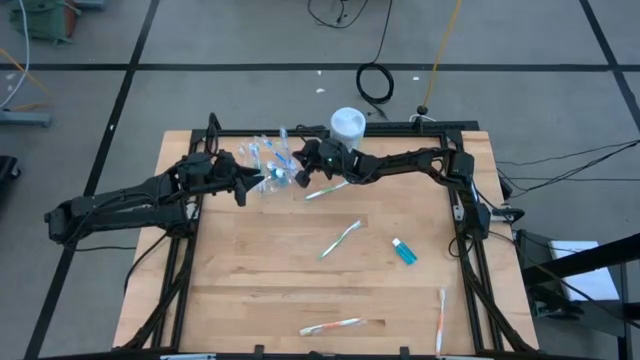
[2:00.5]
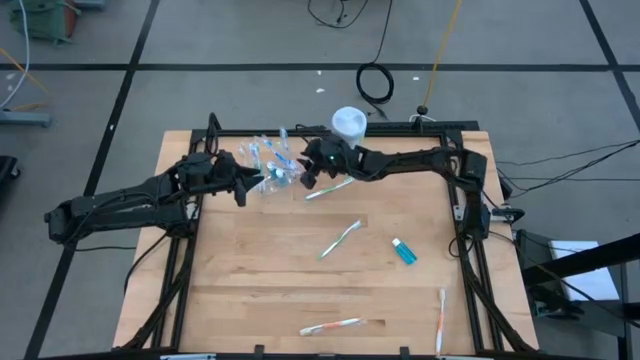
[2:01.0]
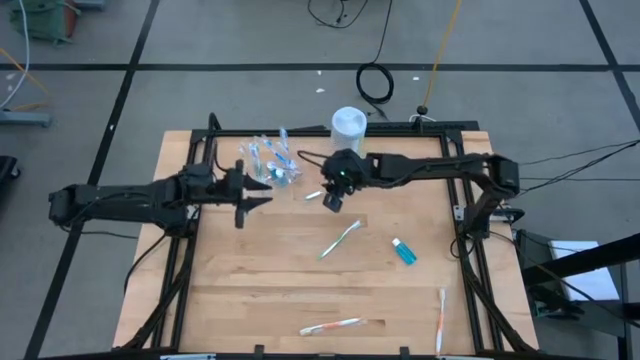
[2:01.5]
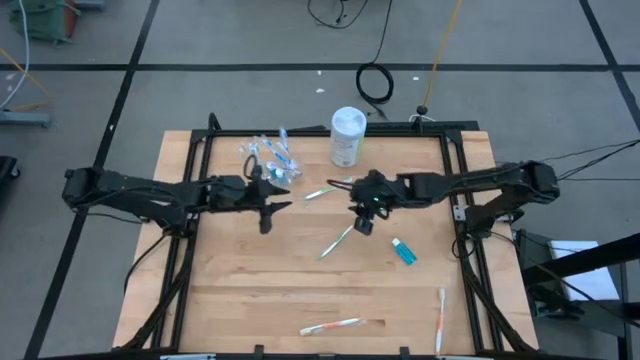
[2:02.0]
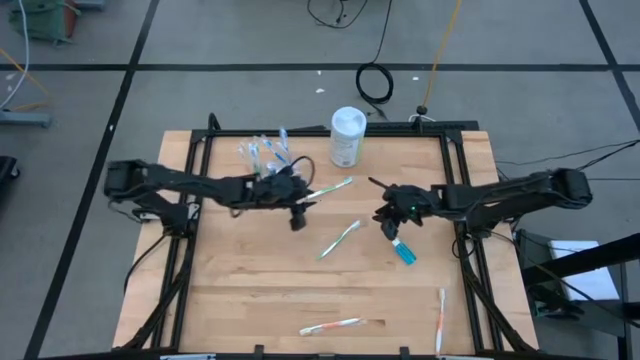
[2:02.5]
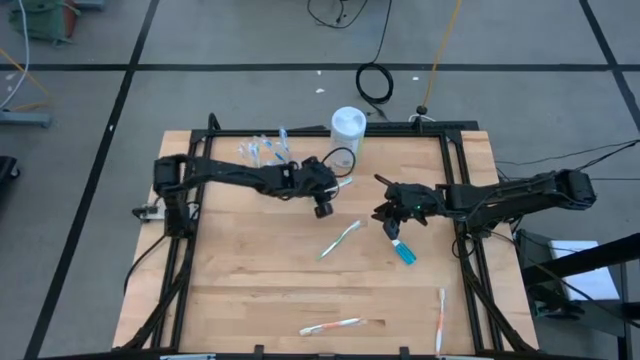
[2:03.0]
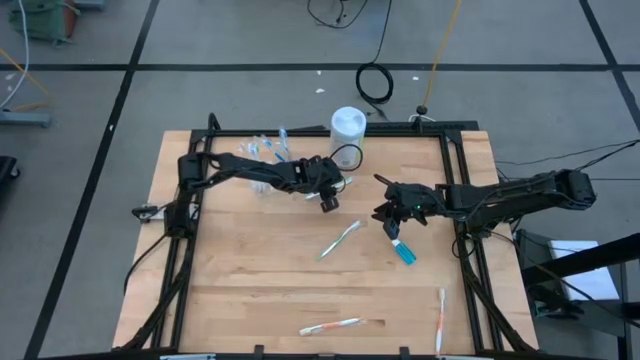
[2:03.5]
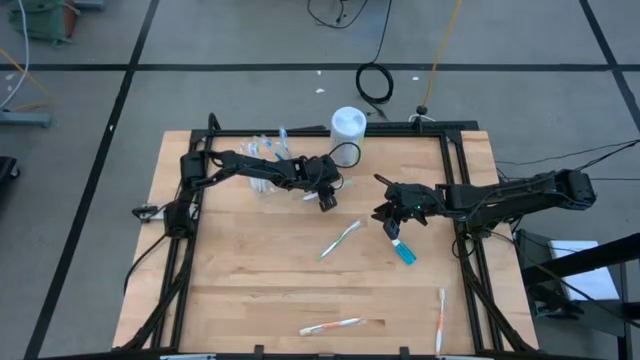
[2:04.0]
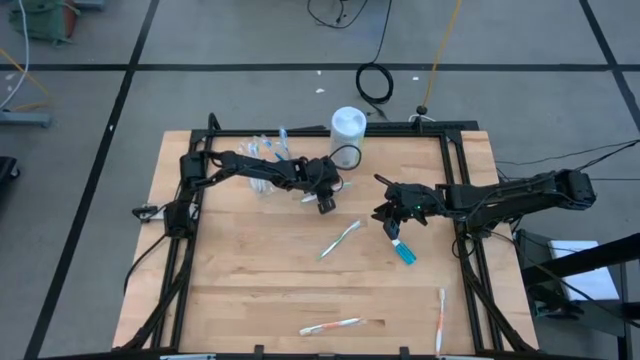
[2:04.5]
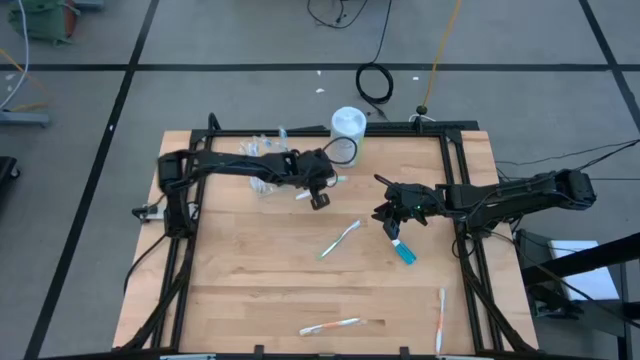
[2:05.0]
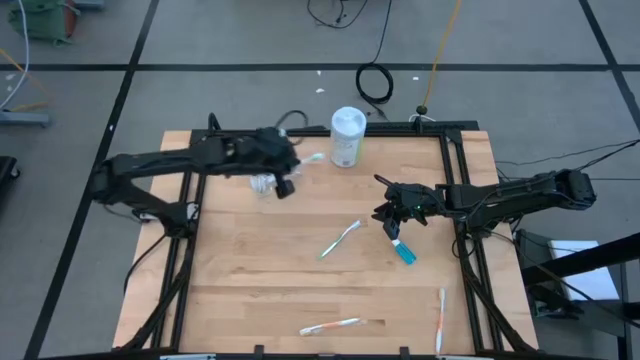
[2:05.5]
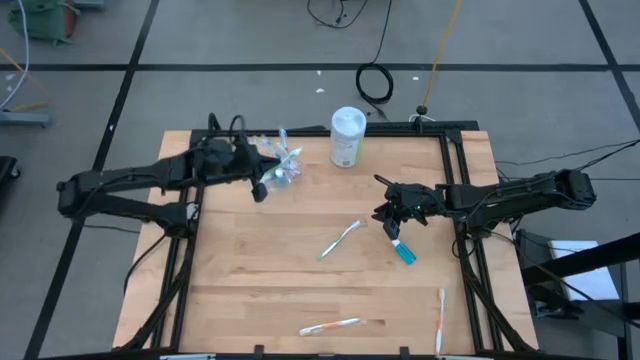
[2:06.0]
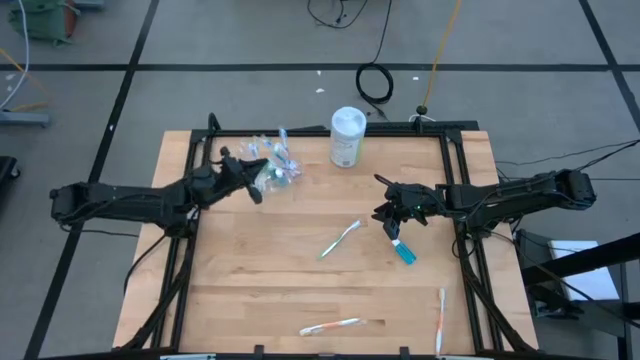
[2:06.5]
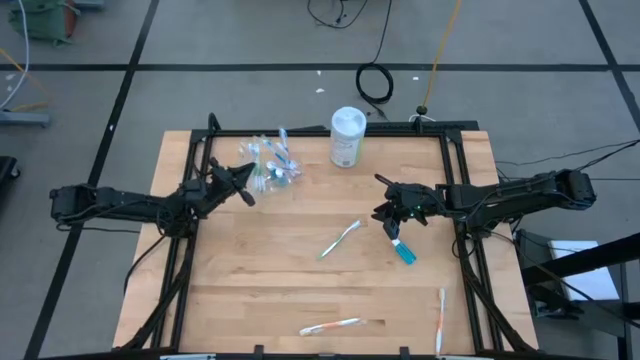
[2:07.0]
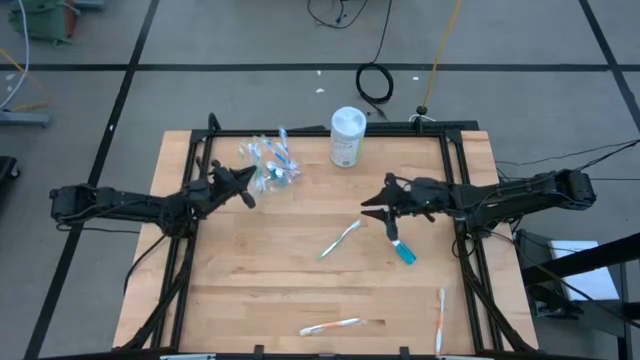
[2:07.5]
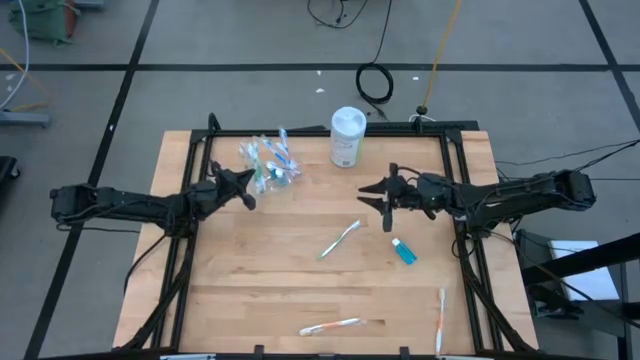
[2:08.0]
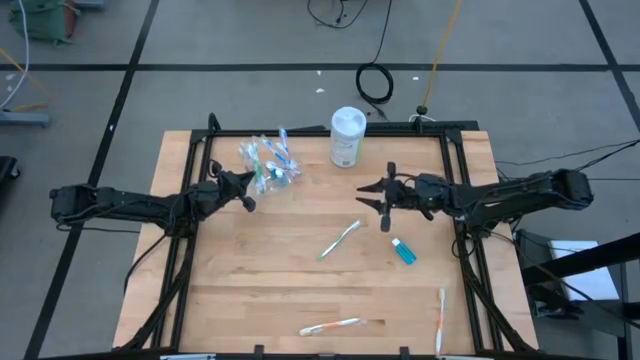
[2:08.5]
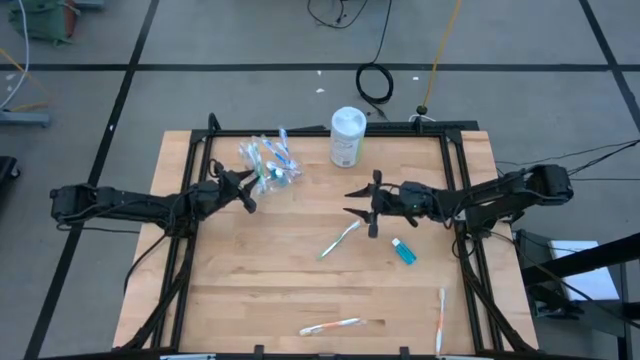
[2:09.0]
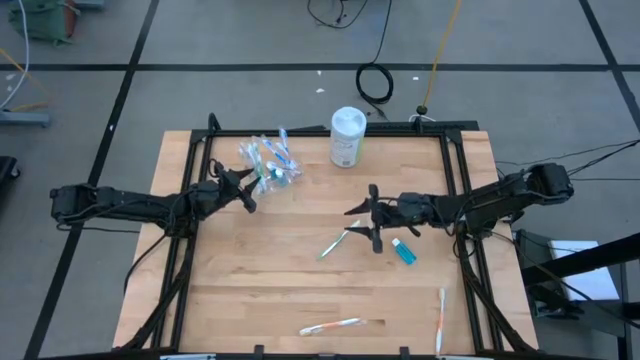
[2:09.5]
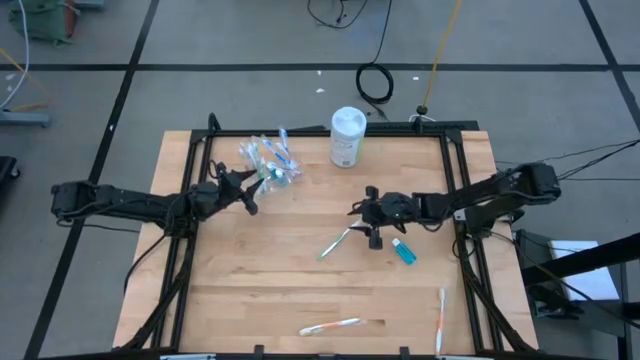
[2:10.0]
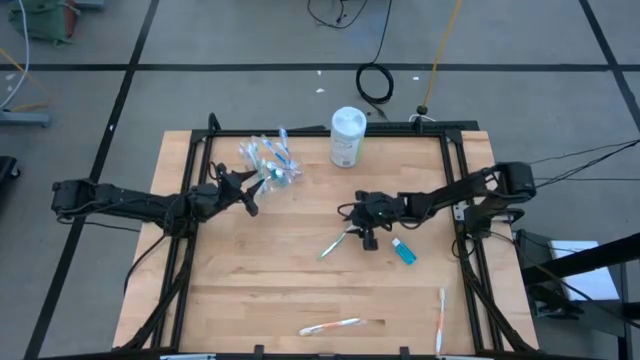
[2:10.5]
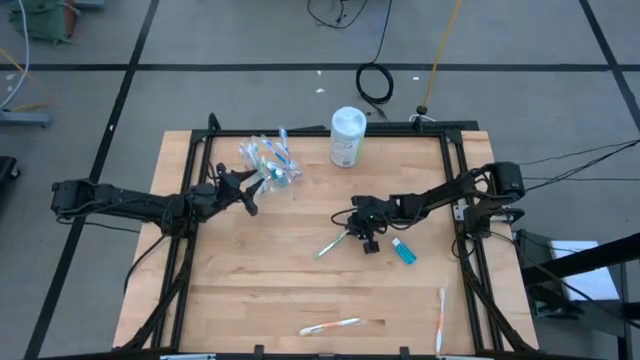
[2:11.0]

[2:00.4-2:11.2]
Task: Pick & Place toothbrushing station
Put the green toothbrush into the left of the transparent organizer

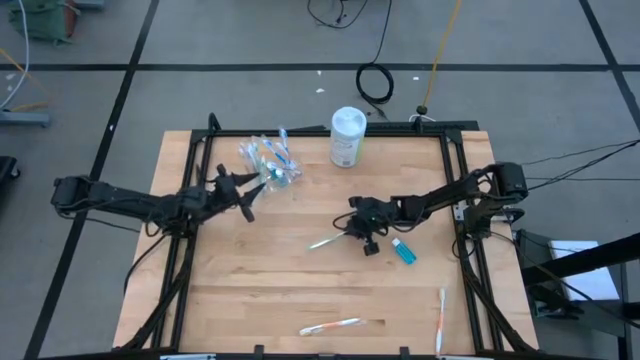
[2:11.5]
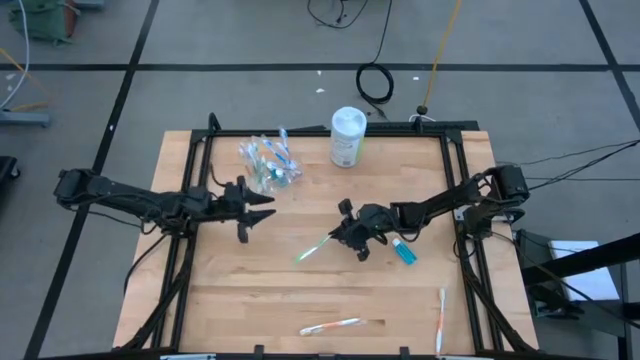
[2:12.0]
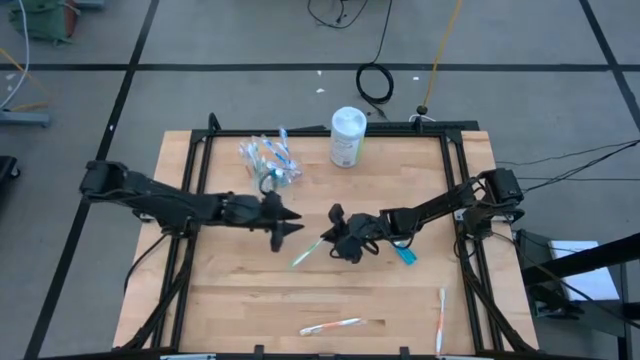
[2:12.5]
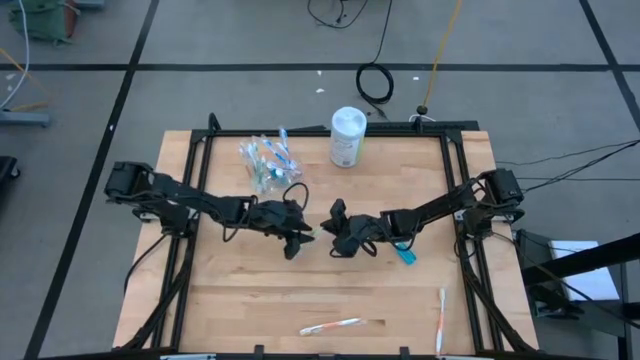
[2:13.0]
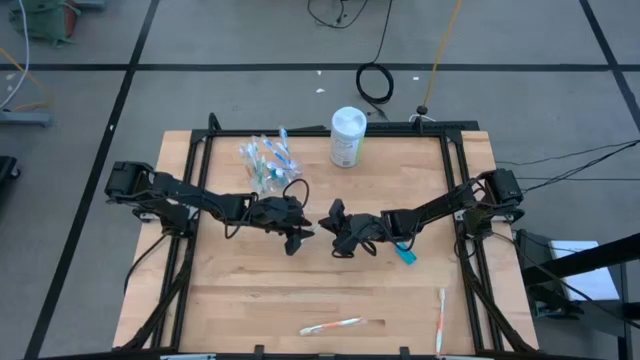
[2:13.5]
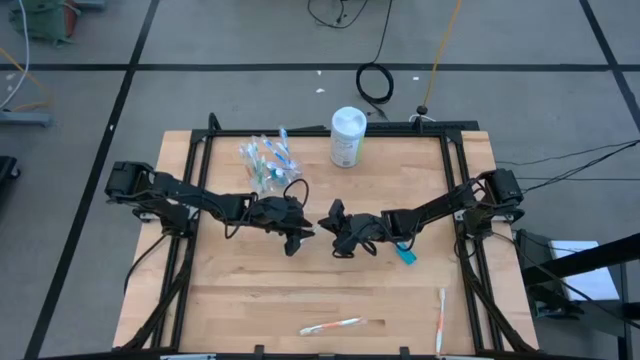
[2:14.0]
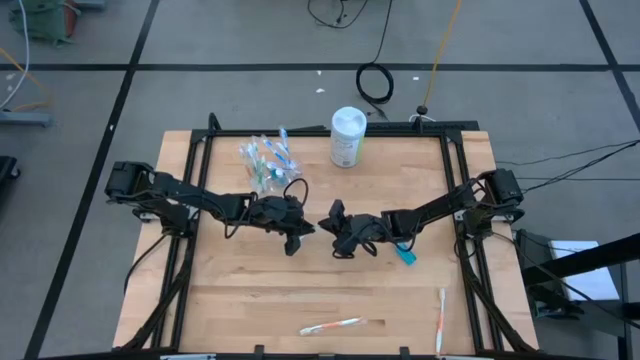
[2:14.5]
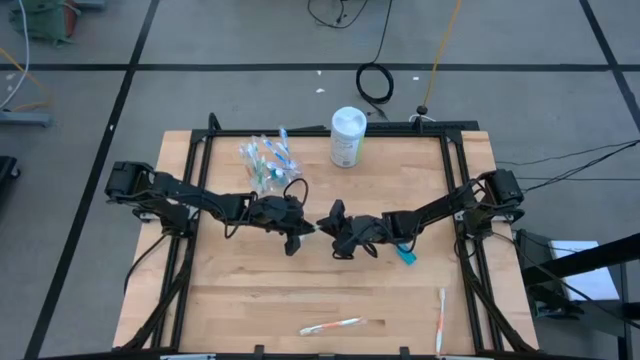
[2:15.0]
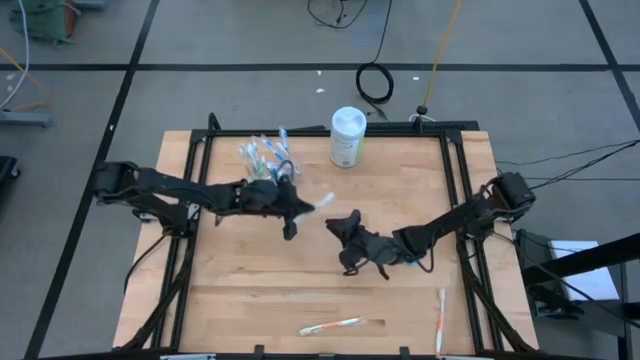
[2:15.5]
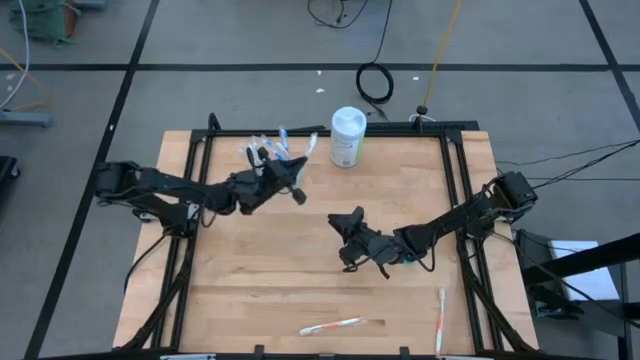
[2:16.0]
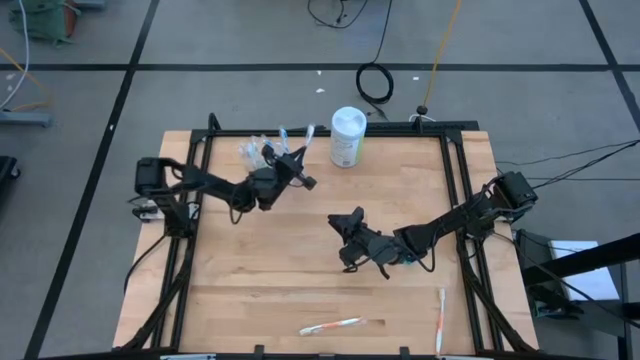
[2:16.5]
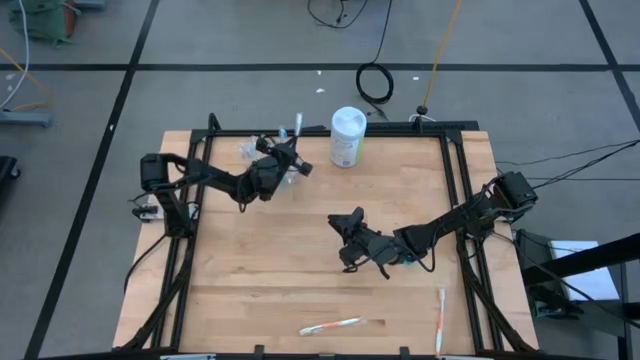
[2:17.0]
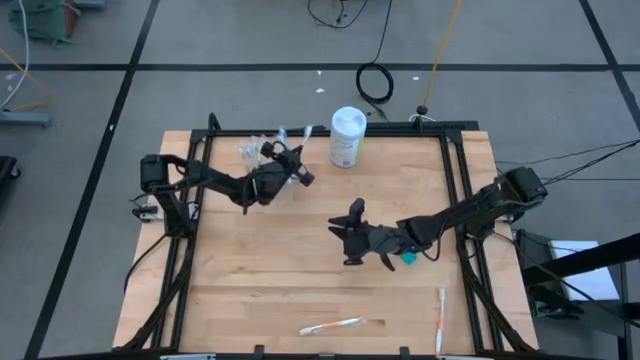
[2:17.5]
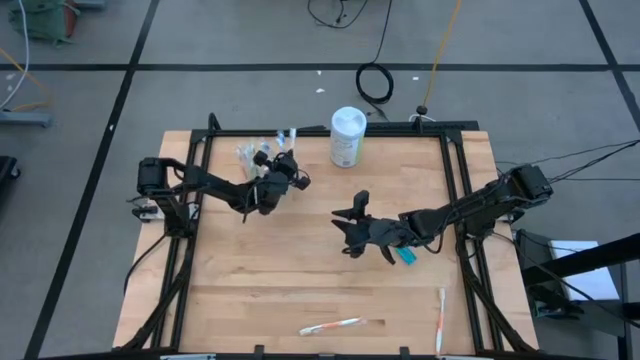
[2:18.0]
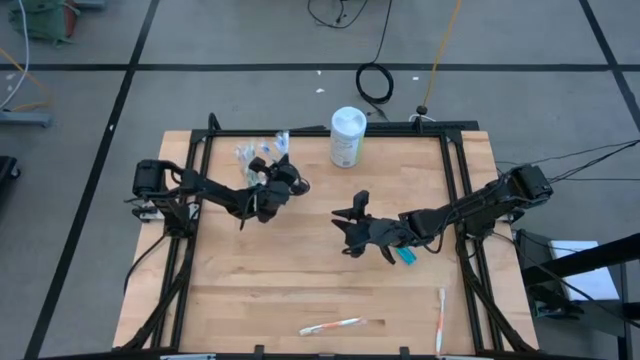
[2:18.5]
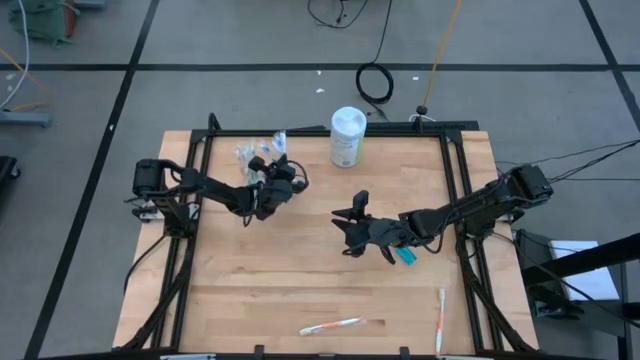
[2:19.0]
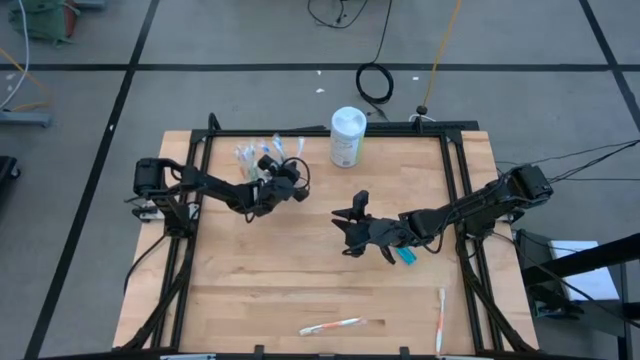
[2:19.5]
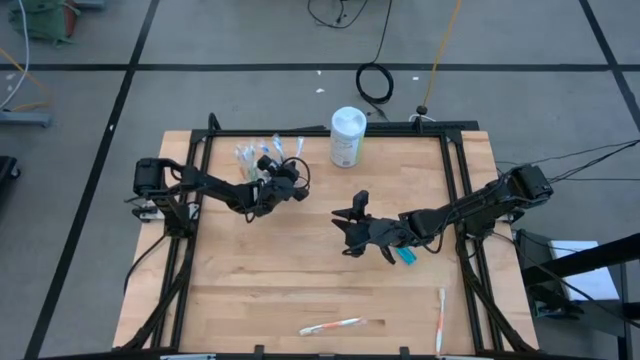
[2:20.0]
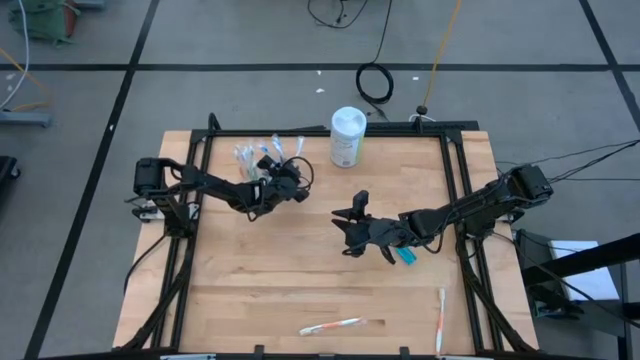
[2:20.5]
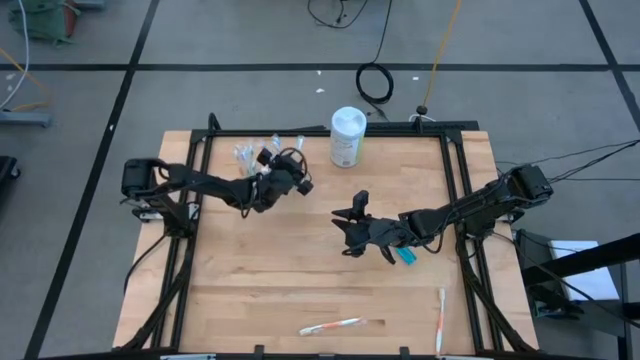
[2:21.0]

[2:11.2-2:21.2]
Put the green toothbrush into the right of the transparent organizer

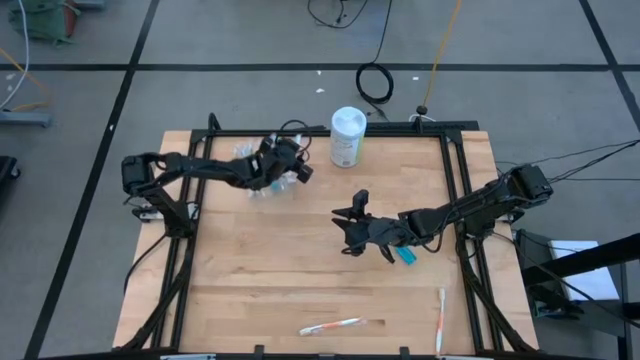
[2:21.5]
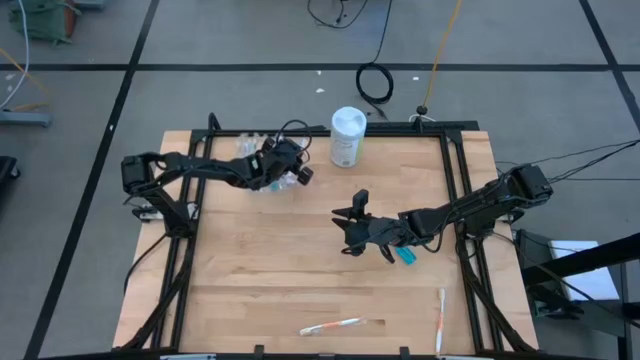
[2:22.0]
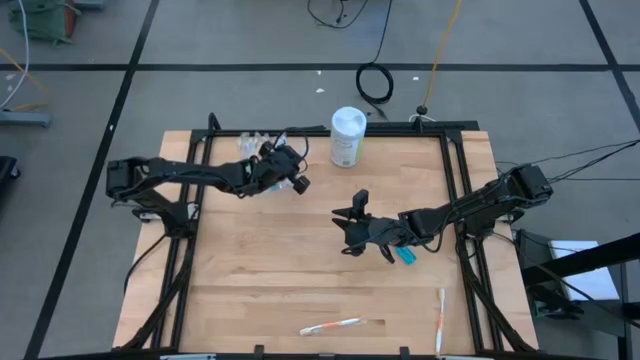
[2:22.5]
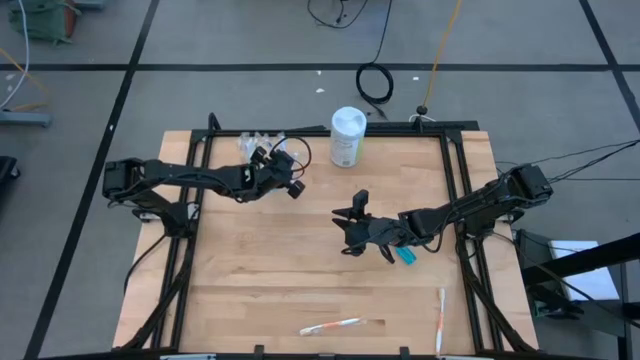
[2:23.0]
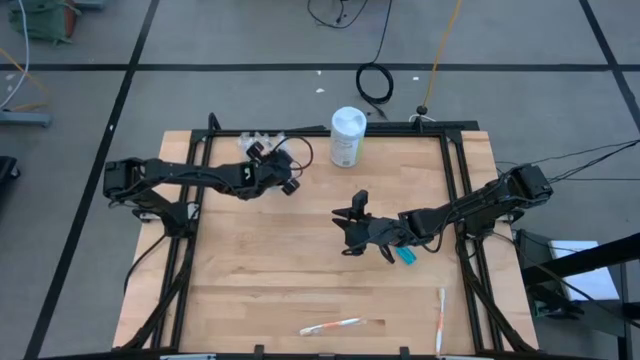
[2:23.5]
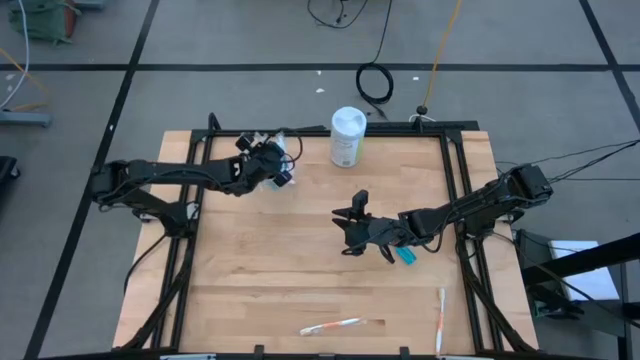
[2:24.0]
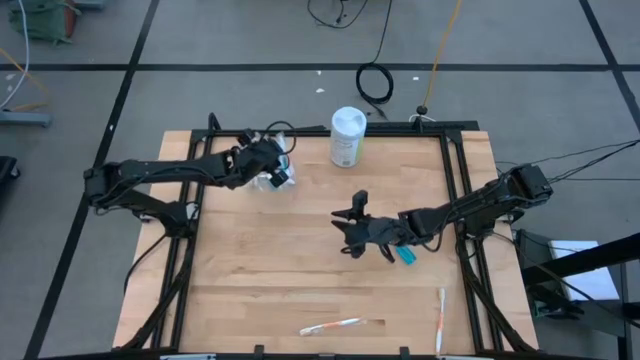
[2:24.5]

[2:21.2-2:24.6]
Adjust the green toothbrush to the right of the transparent organizer
